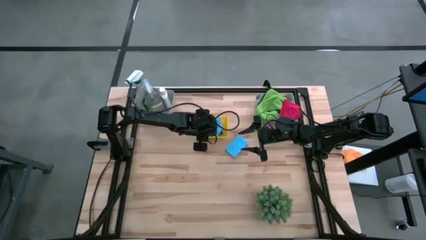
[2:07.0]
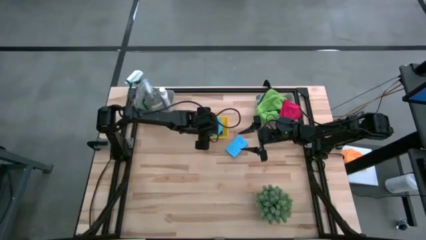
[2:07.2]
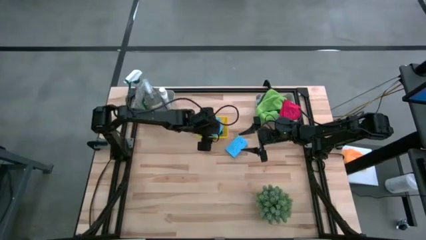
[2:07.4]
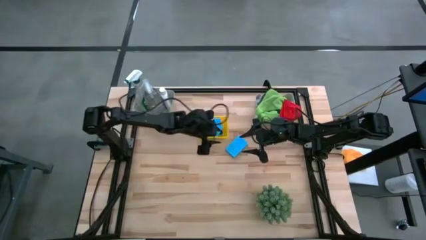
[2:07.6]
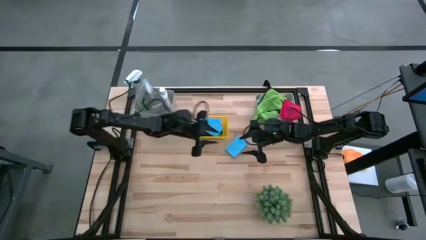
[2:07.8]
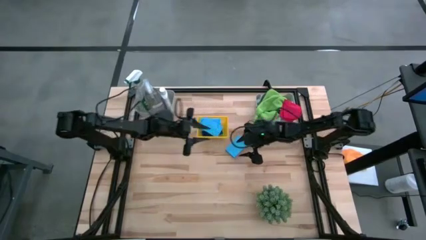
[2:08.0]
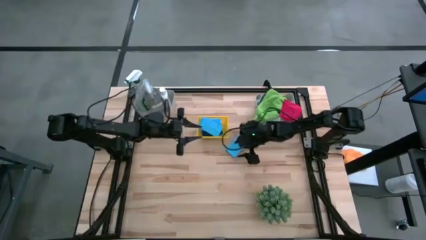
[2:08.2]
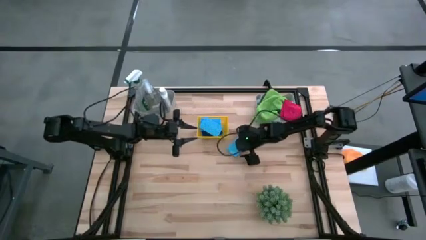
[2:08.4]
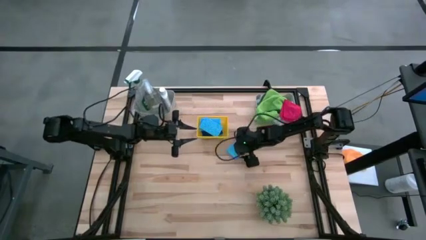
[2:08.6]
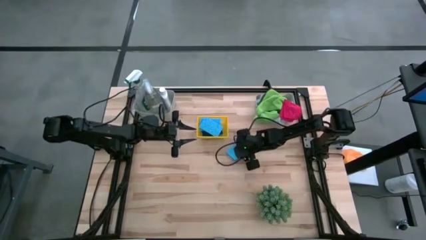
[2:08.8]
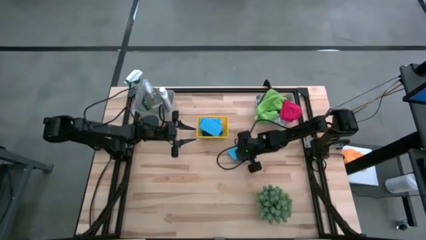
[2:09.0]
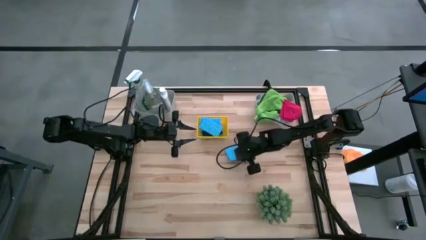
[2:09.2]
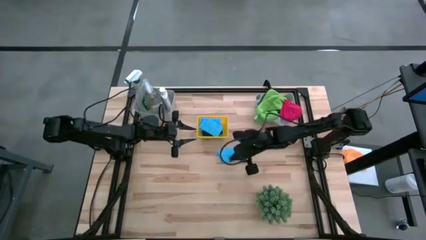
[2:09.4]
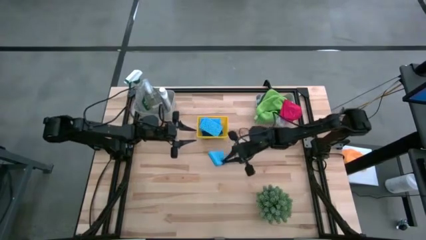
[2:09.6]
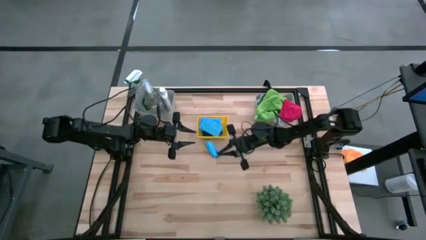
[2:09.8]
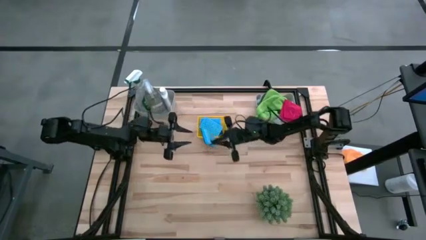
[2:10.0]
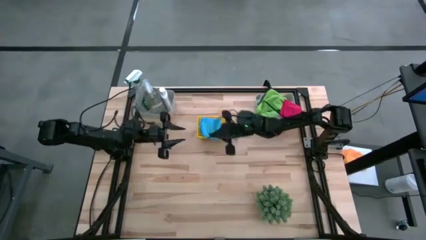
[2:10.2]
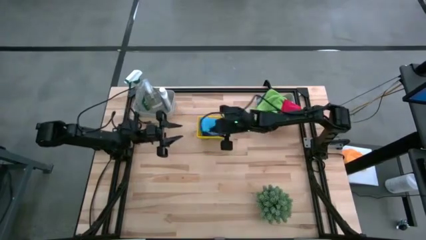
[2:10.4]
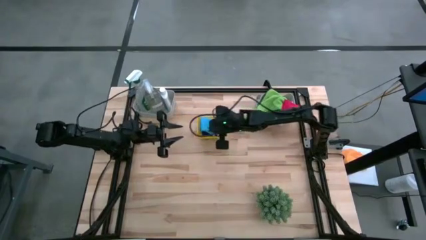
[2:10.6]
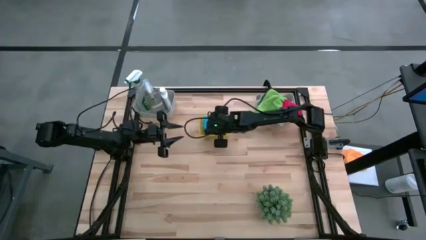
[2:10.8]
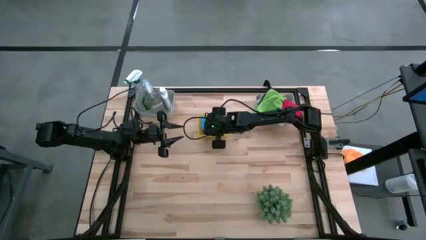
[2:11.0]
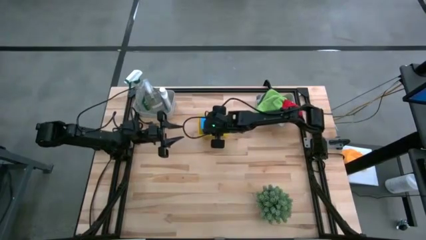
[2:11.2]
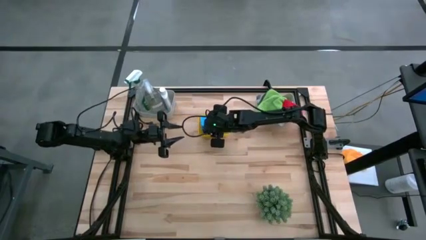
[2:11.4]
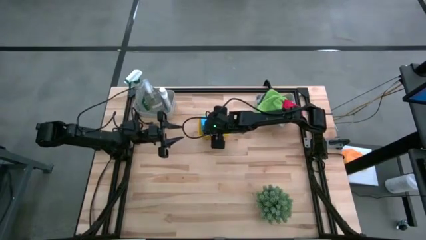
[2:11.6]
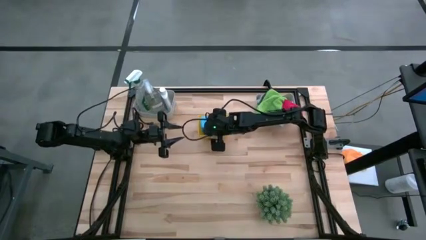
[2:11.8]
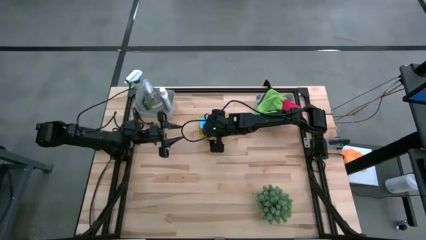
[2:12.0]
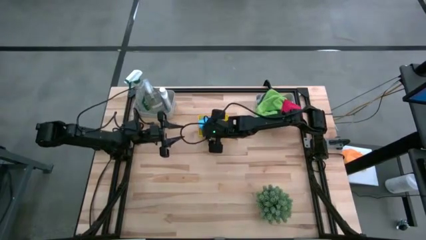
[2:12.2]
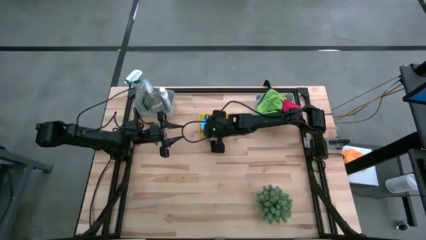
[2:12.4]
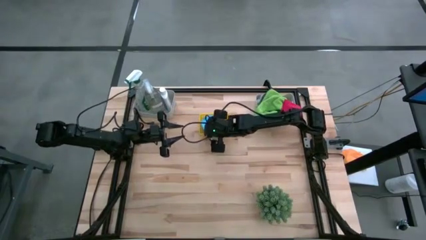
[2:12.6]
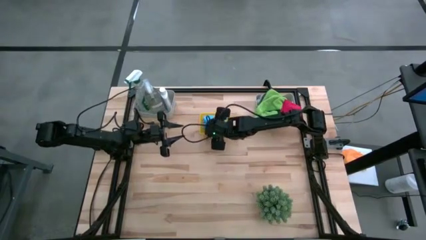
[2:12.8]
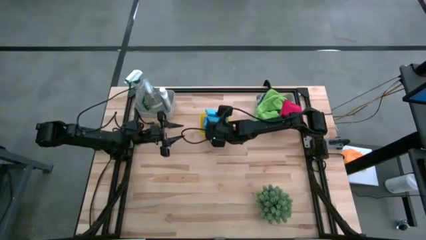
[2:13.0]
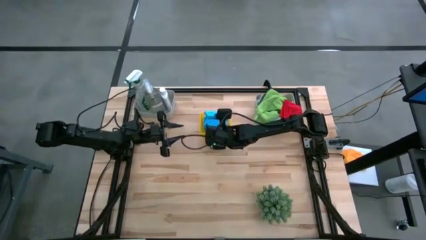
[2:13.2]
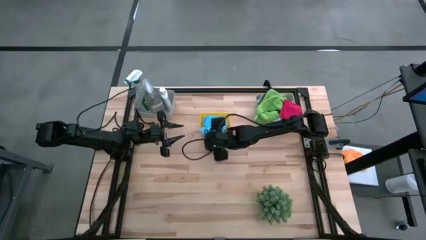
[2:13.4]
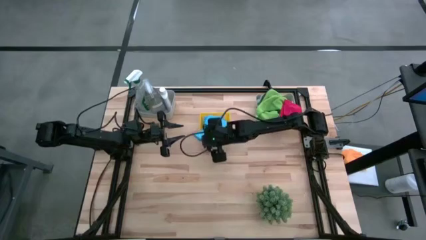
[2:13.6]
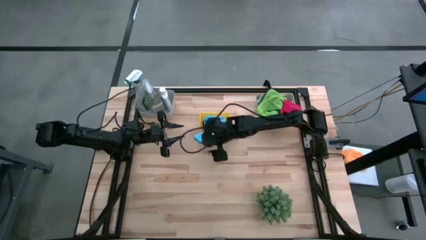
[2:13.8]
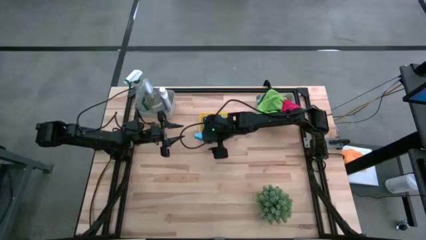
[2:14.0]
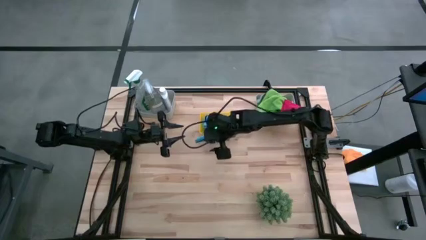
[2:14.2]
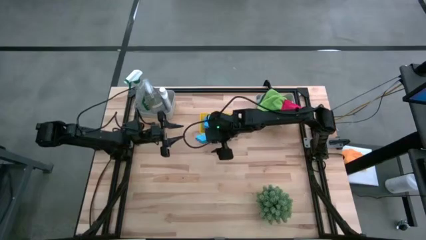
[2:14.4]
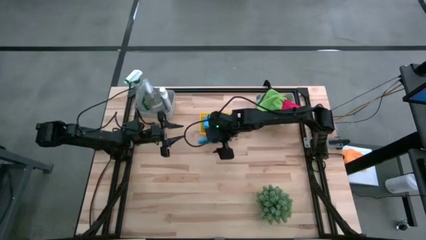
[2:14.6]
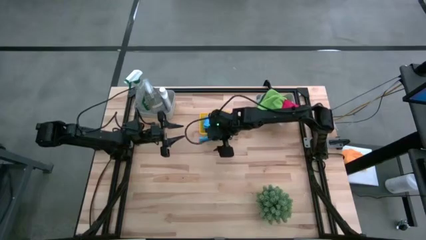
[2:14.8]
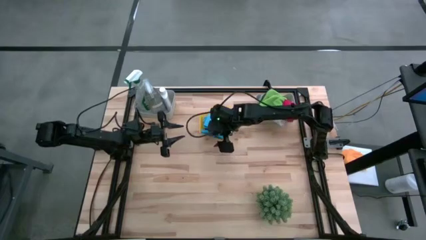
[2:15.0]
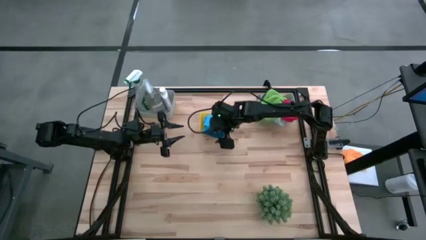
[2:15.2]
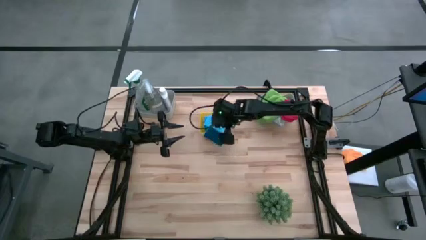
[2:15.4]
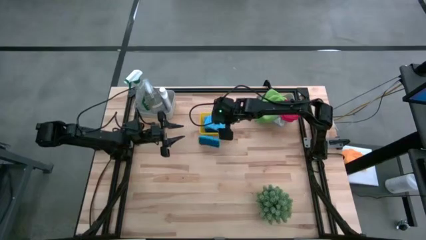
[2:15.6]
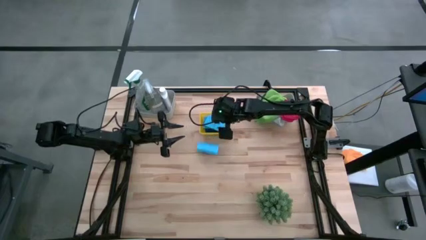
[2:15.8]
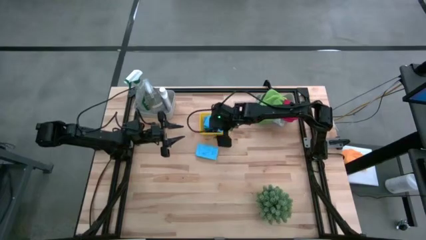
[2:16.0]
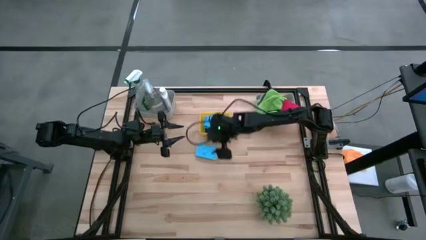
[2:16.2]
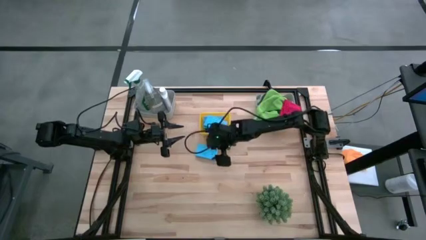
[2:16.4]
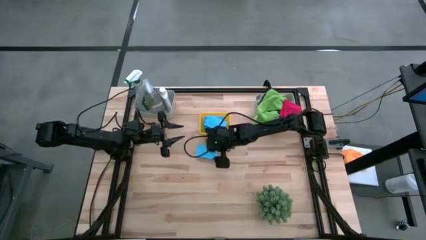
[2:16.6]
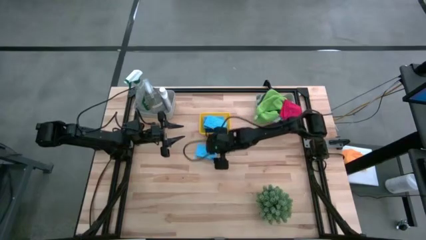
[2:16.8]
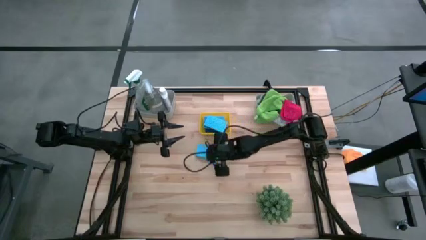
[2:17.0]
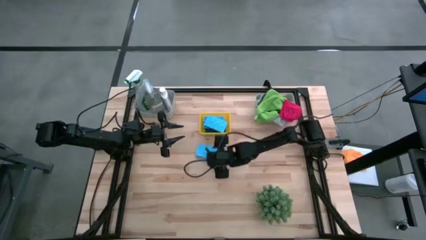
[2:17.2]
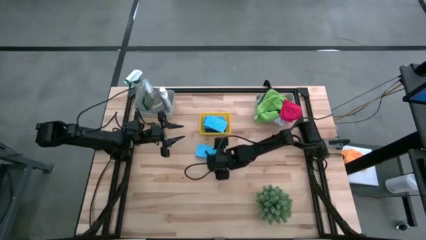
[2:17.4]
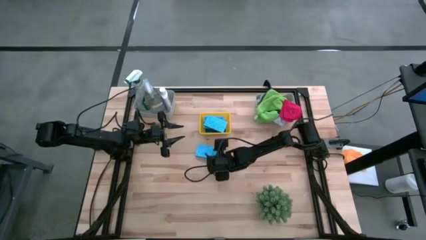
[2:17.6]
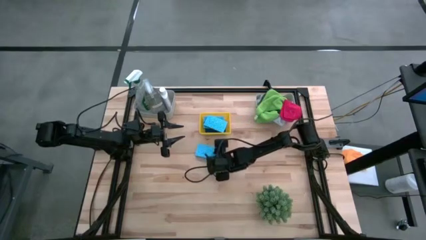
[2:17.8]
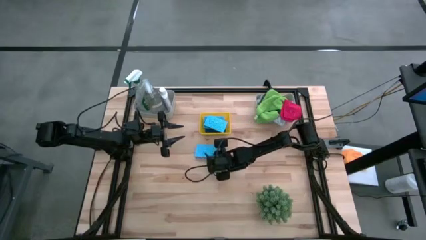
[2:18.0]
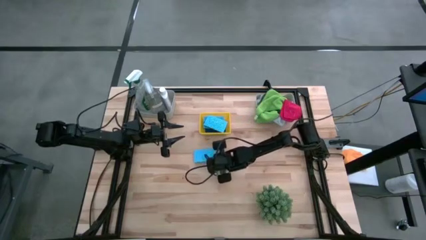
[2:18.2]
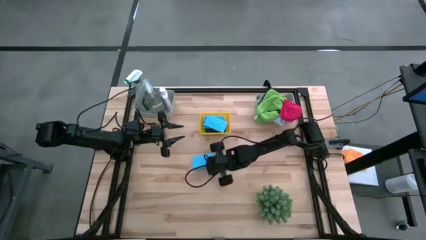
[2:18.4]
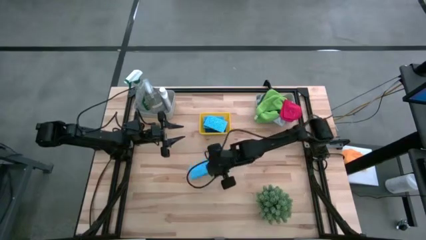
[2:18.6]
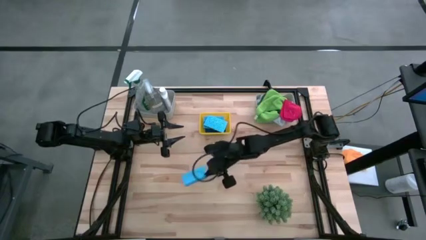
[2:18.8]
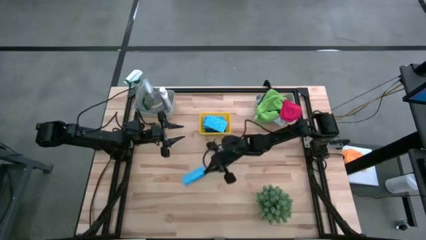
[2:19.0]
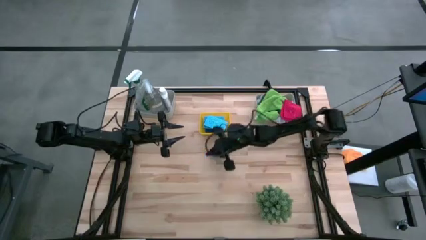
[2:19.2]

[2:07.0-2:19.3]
Task: Pick & Place Kitchen Items
Put the blue sponge into the yellow bin

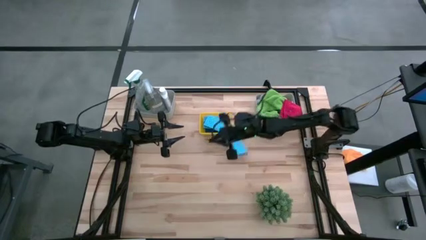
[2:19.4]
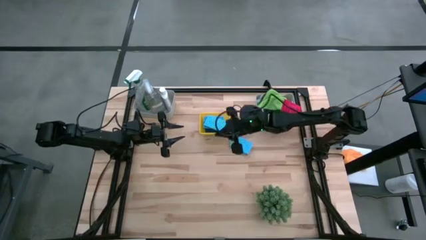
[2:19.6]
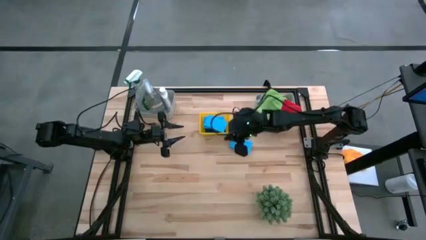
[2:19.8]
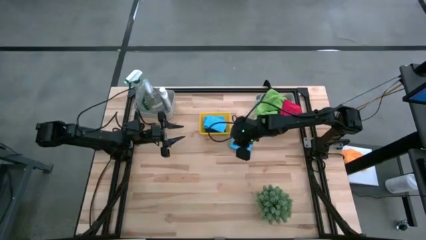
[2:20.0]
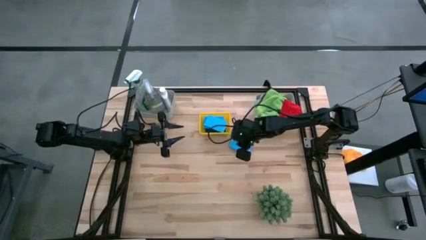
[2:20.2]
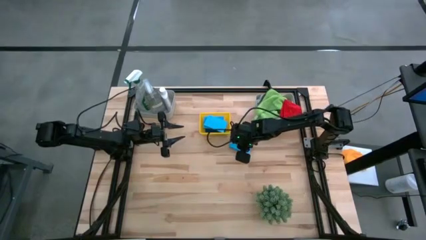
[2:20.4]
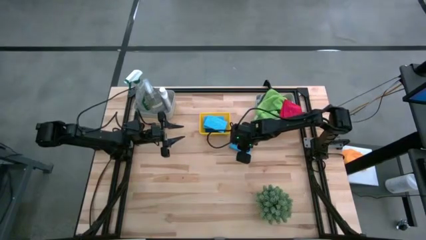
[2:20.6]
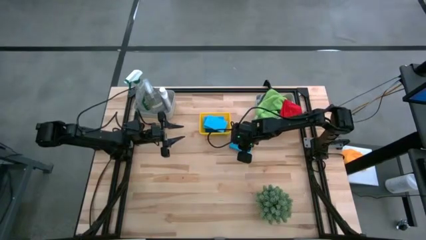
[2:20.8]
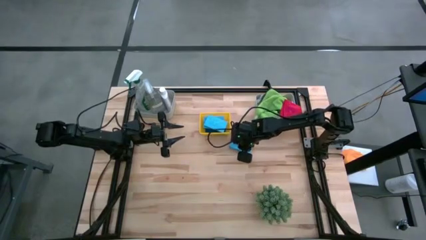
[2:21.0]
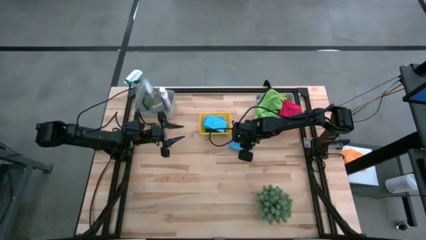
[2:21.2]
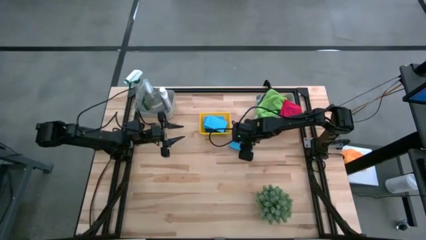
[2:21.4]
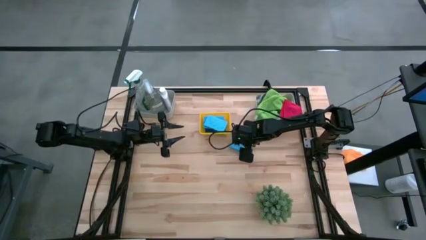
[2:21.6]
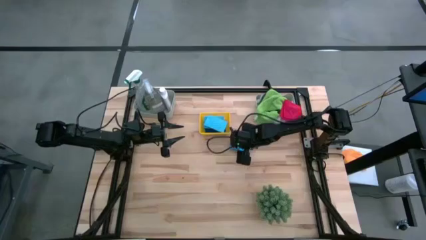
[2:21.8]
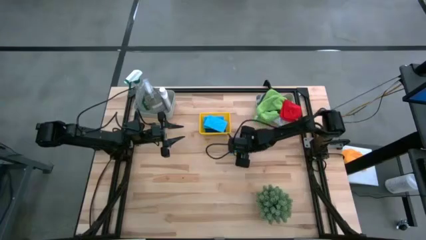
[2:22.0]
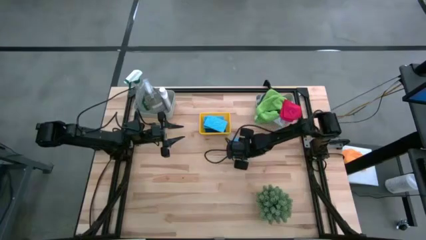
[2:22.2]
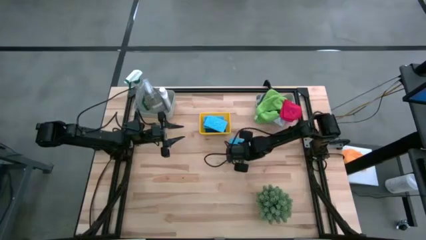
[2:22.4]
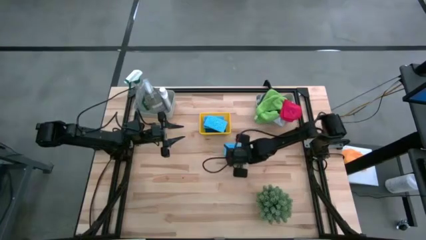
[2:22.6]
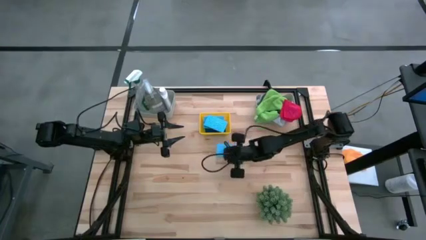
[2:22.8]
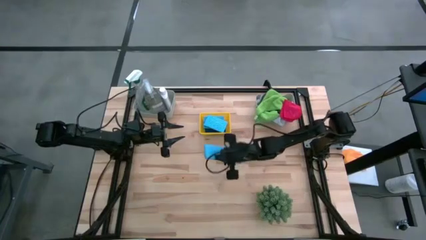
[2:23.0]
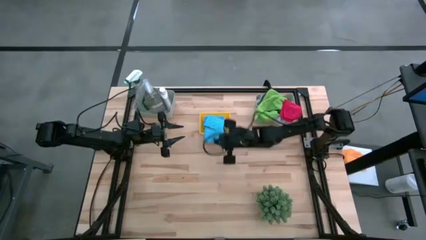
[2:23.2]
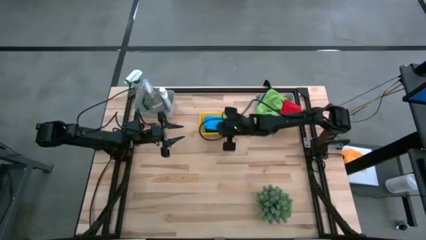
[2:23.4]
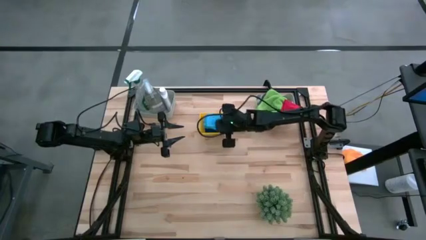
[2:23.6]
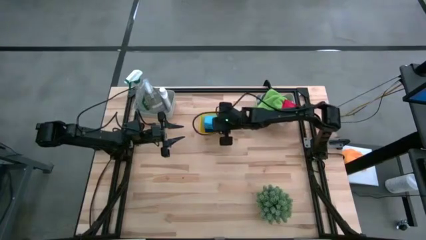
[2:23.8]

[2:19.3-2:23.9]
Put the blue sponge into the yellow bin
